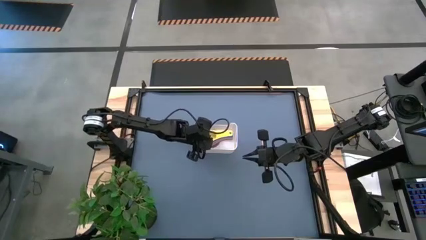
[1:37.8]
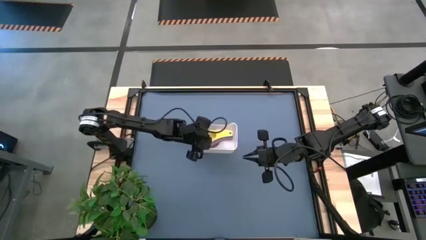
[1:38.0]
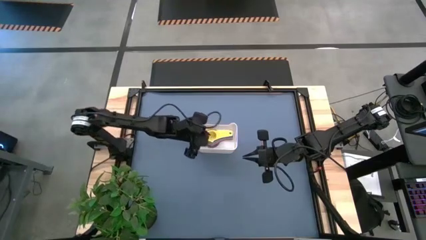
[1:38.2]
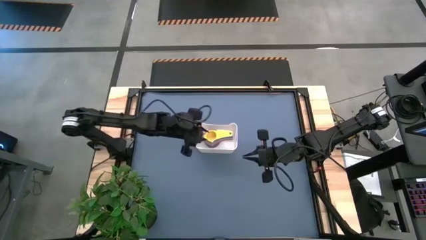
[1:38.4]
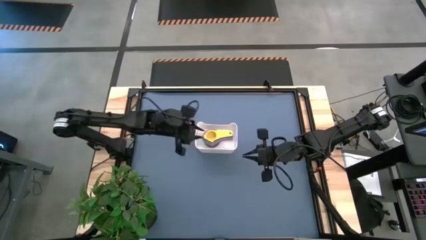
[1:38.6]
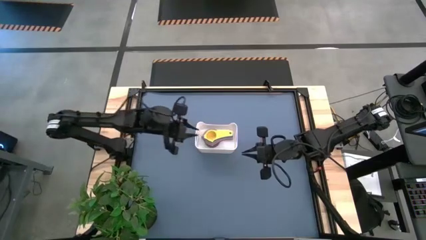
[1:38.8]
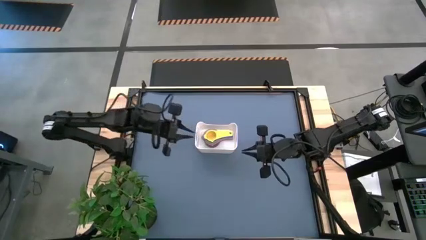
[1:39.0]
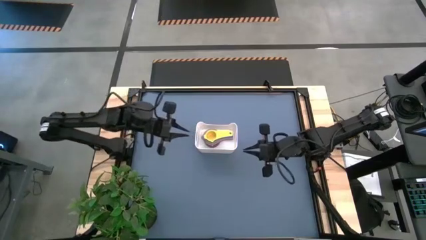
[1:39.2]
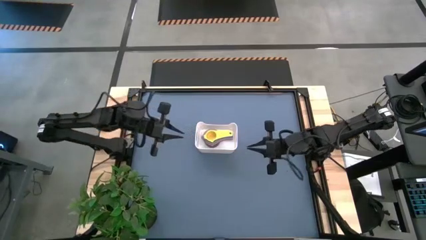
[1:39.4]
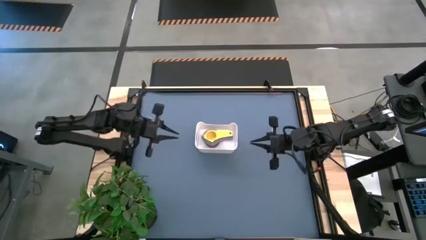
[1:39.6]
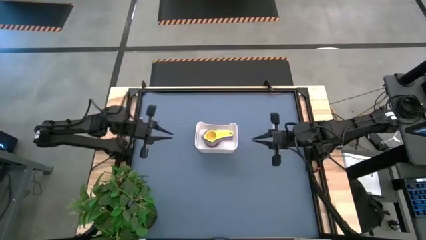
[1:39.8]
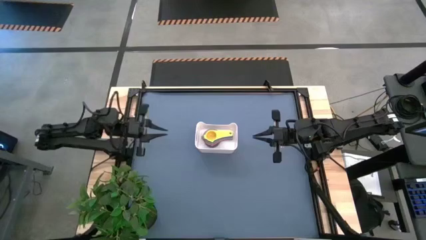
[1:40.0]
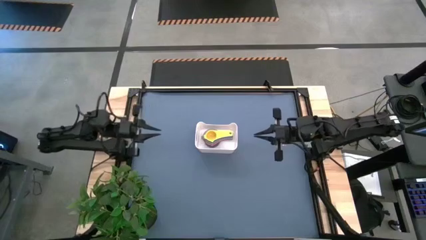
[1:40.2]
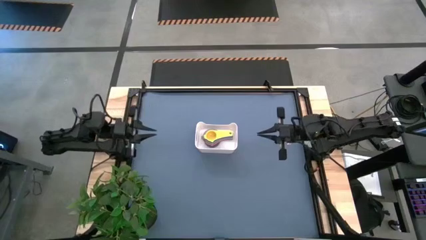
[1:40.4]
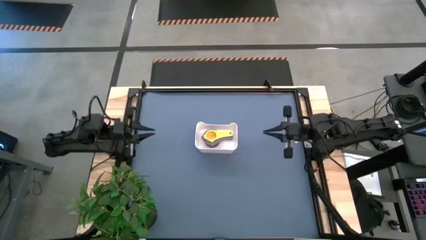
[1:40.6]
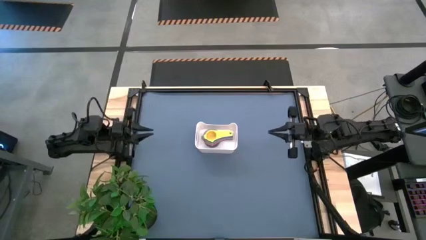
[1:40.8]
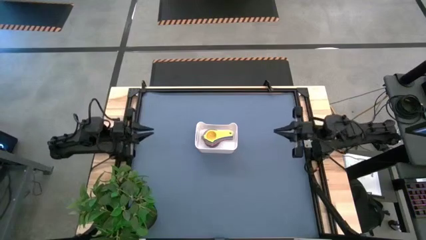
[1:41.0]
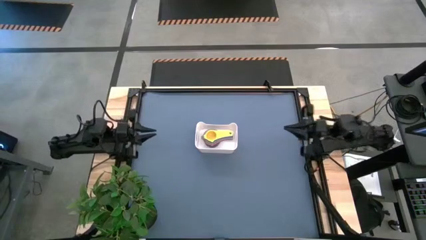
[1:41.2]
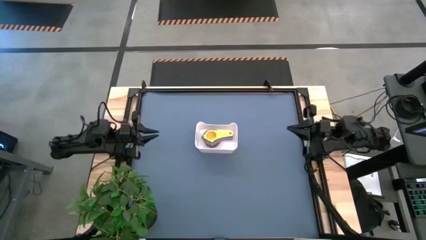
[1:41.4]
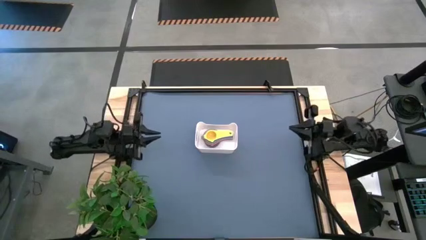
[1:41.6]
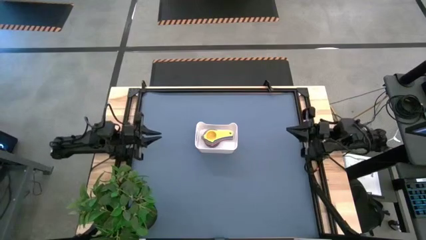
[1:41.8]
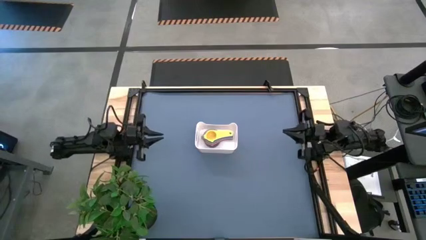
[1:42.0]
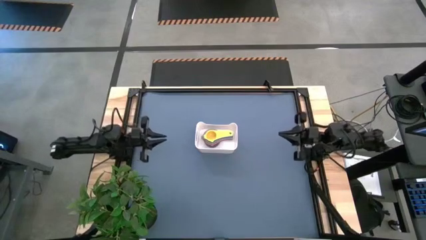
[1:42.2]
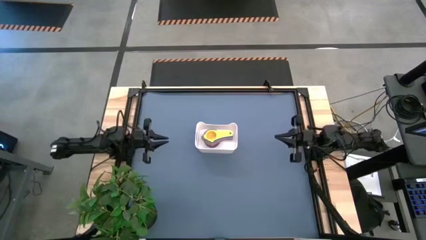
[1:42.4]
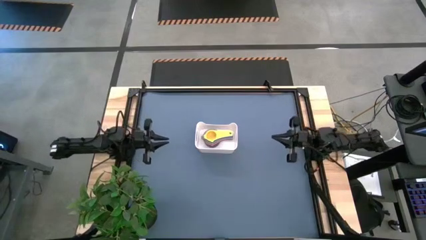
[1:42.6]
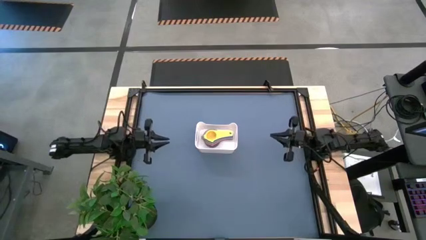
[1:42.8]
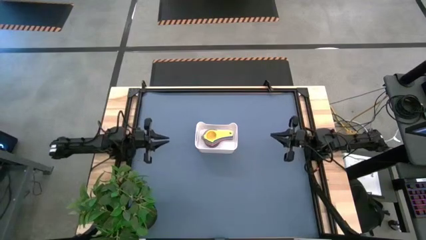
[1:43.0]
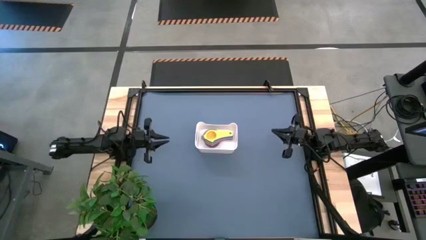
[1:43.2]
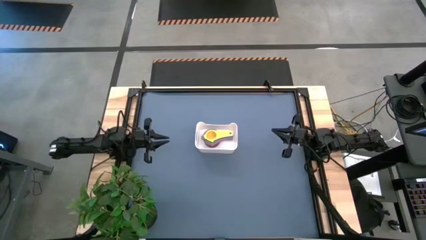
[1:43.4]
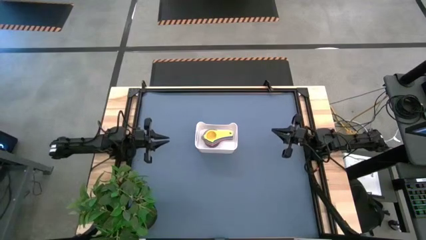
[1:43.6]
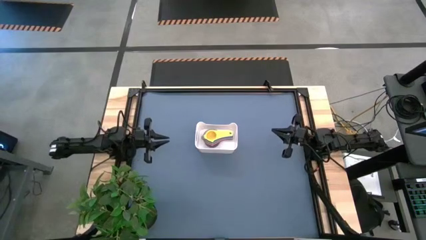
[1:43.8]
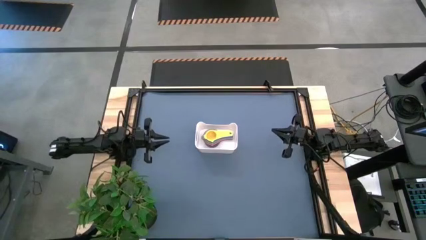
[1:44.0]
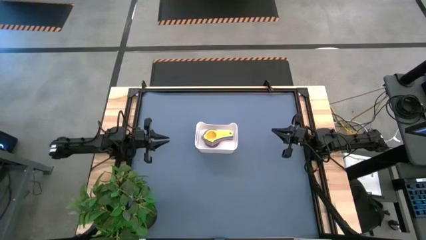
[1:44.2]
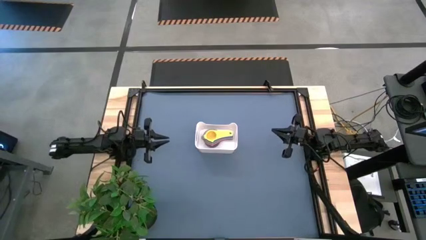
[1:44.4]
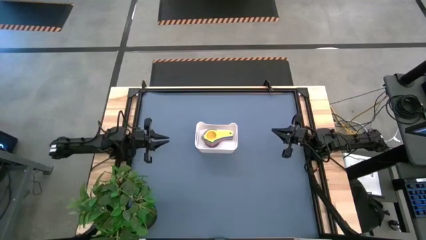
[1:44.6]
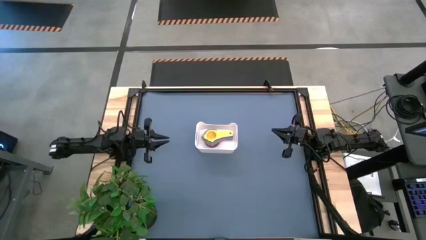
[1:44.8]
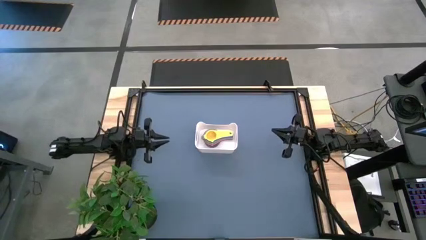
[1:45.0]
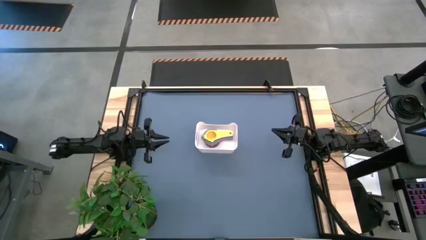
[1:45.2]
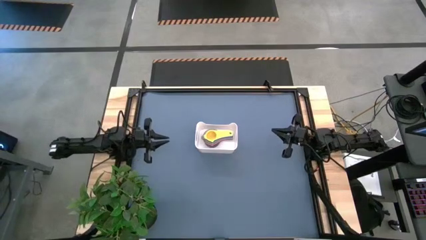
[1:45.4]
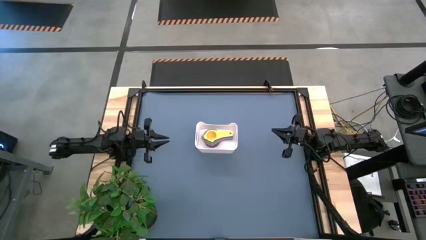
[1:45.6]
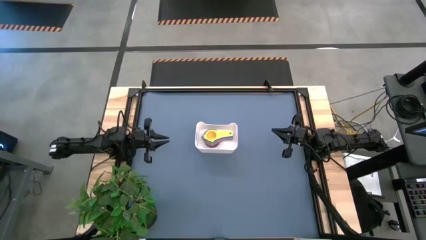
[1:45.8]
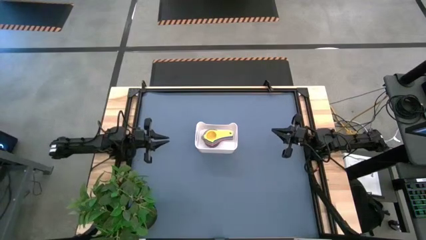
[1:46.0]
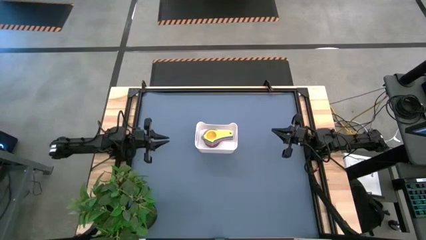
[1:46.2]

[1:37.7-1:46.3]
Task: Nest measuring cups in basket
Return to Home Position

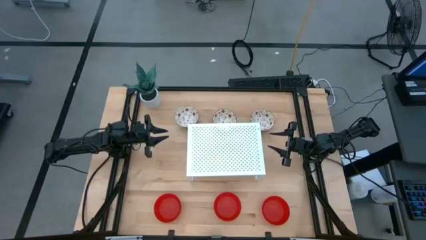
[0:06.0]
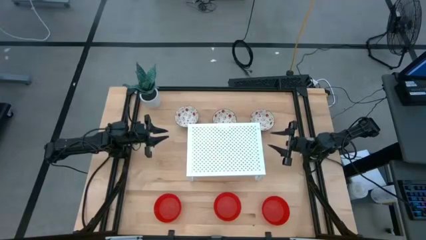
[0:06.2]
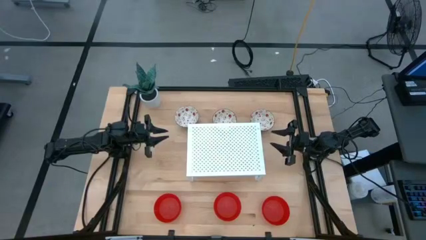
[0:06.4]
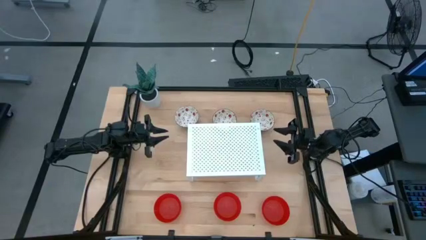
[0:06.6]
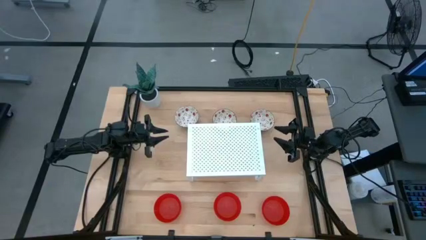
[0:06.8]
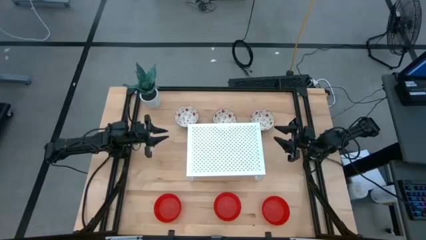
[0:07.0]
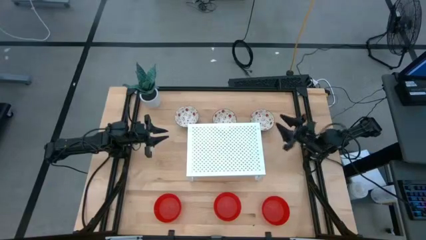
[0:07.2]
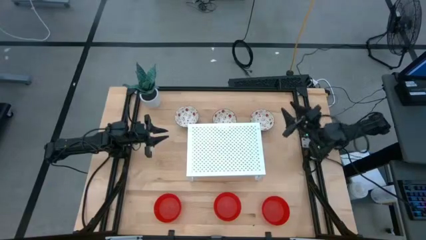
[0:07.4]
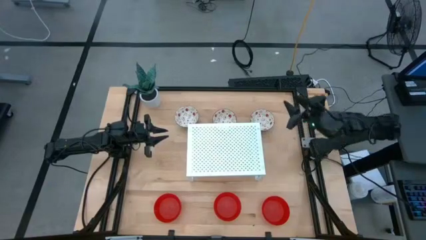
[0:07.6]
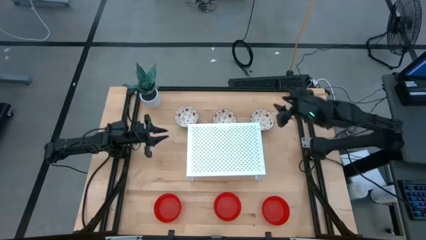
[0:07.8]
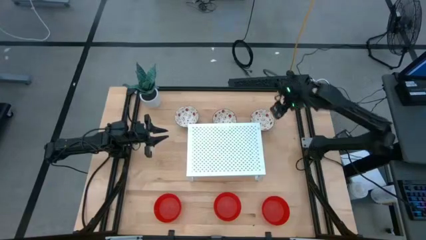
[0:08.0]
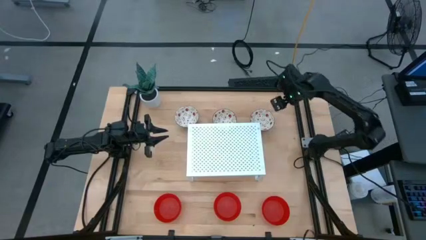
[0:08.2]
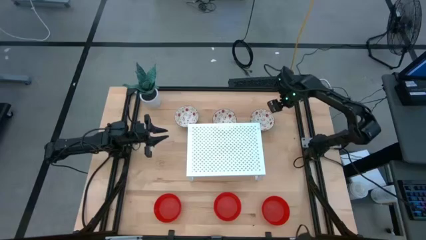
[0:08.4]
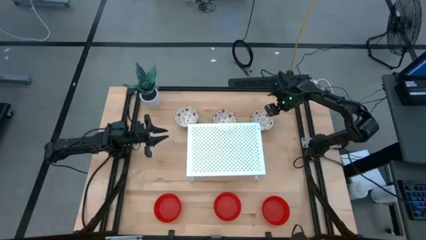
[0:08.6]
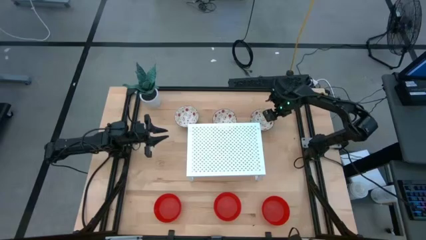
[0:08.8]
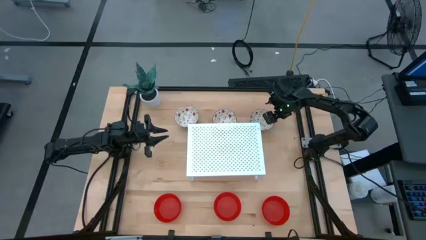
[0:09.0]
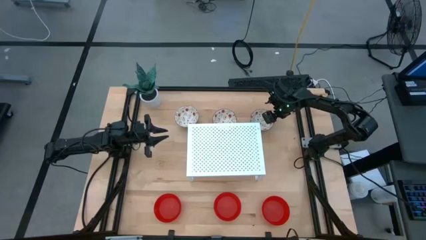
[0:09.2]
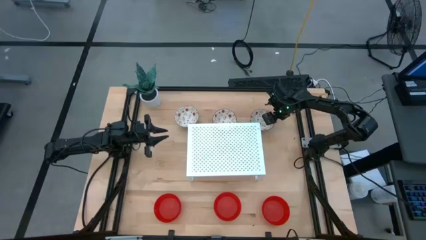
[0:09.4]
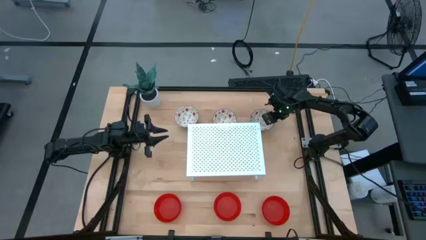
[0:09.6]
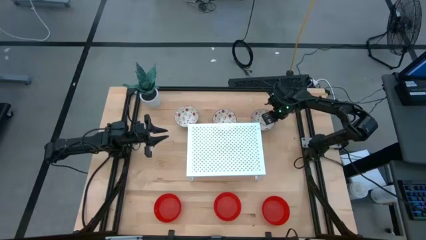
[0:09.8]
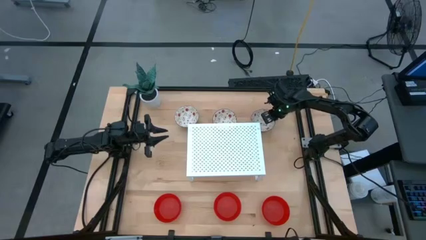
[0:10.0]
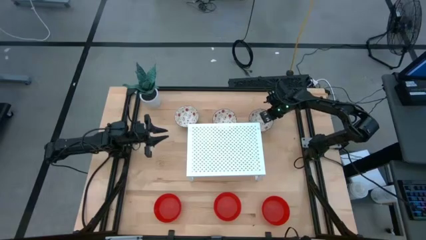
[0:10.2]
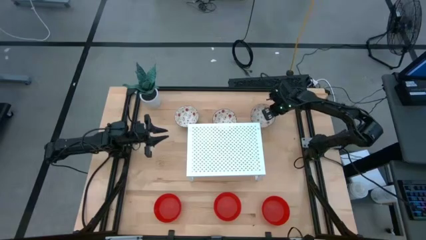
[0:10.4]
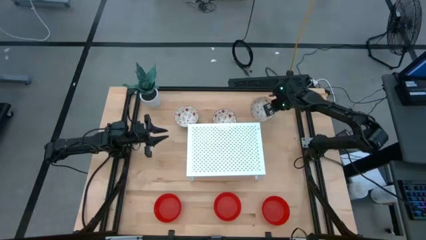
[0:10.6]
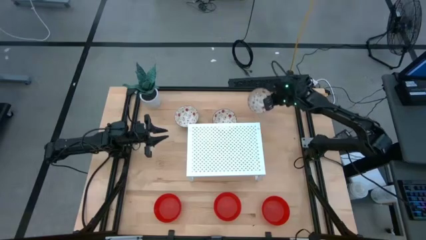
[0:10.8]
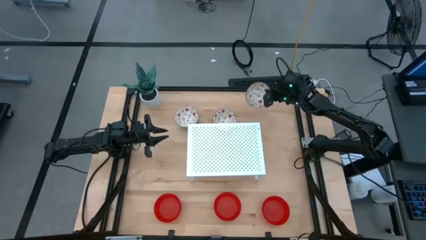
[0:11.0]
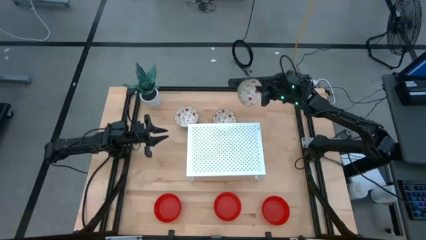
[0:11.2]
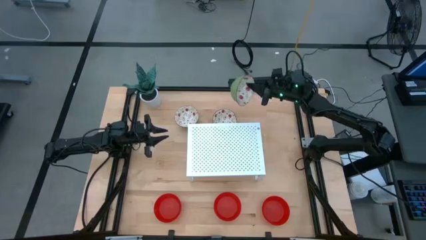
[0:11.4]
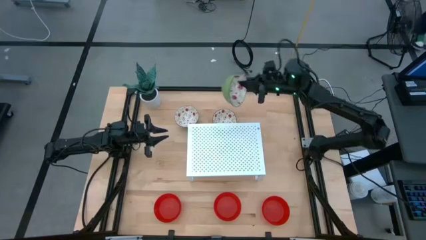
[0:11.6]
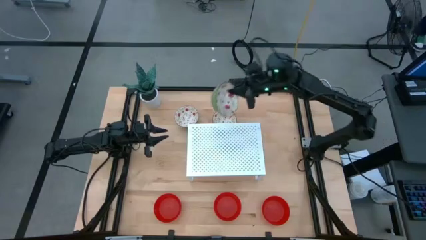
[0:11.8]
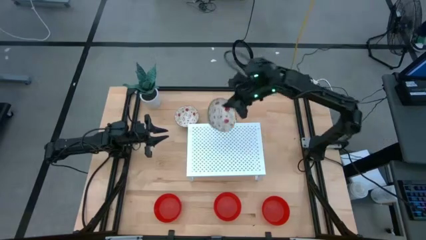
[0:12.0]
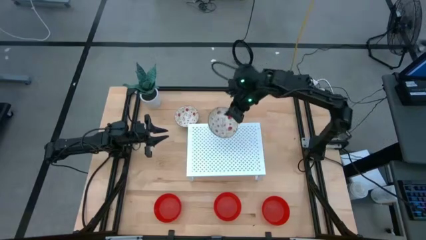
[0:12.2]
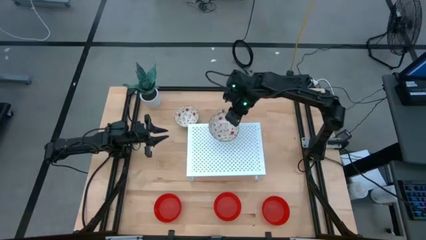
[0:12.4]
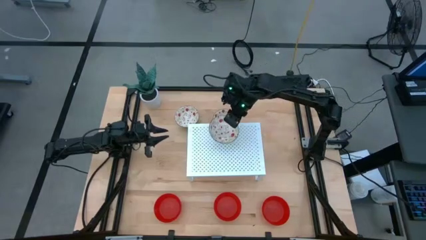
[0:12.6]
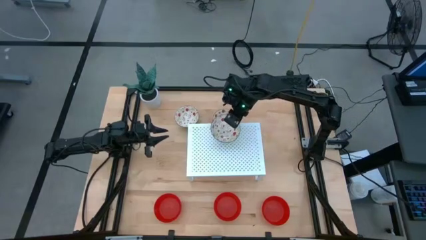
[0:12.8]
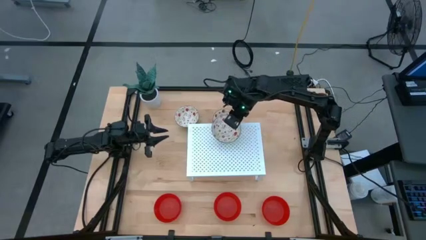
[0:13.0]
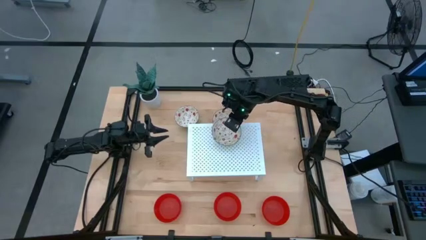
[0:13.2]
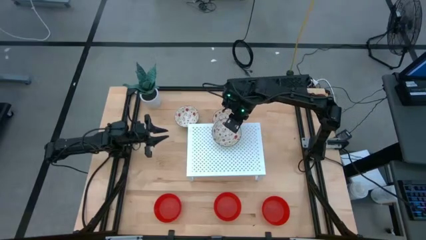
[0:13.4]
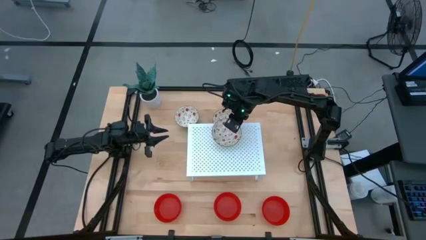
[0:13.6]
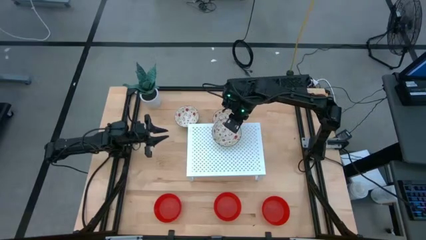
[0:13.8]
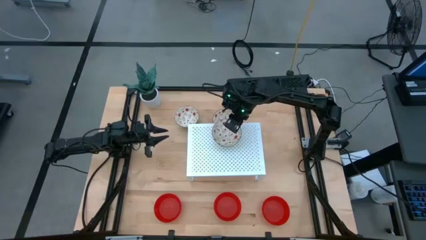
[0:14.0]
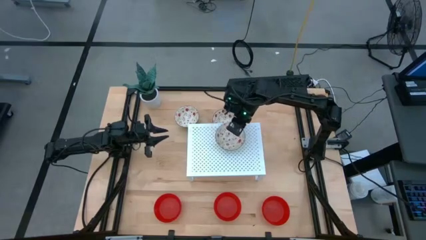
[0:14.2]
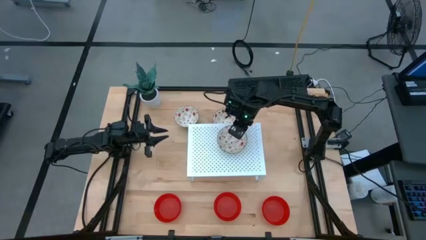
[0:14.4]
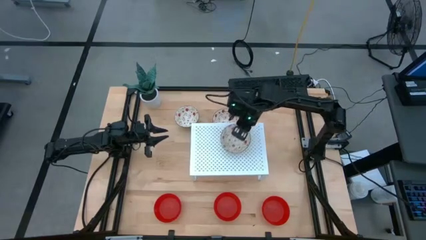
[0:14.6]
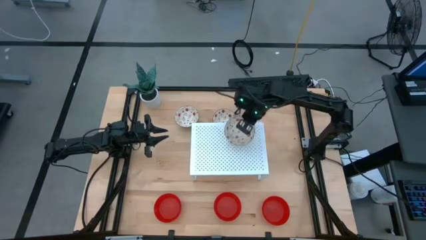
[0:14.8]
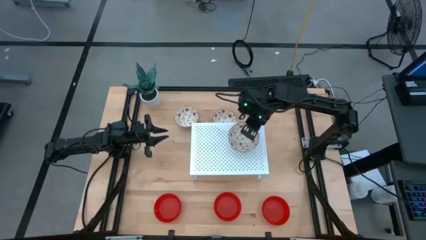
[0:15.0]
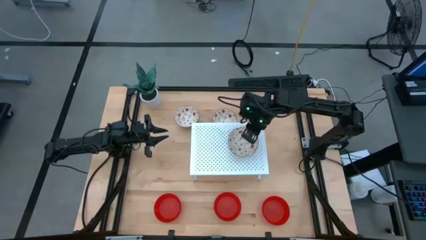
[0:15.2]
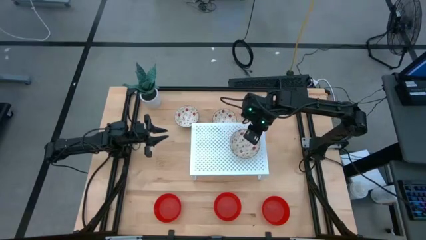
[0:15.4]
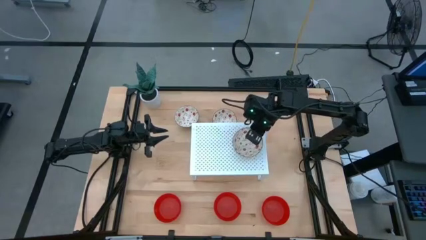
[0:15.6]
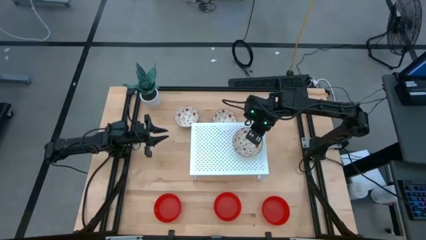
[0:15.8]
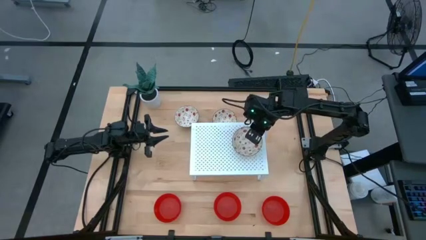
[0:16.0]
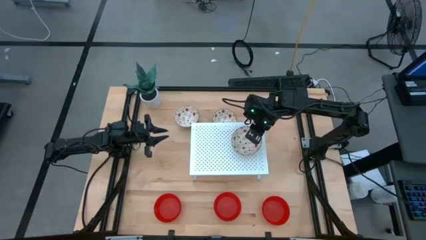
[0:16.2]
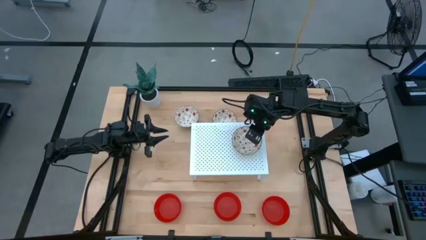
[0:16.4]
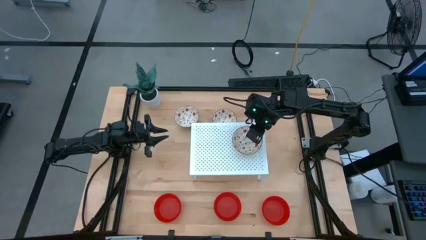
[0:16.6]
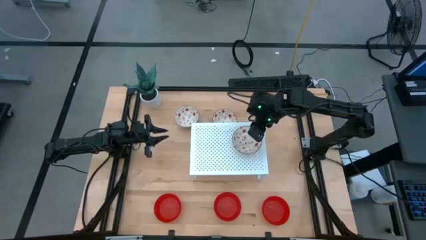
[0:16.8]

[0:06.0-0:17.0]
Task: Pick & Place Mini bowls
Put the right white patterned bowl on the shelf
